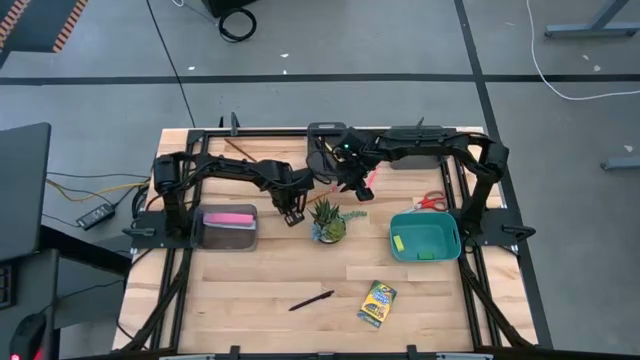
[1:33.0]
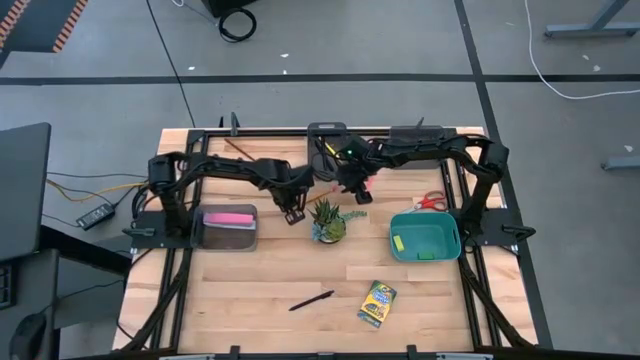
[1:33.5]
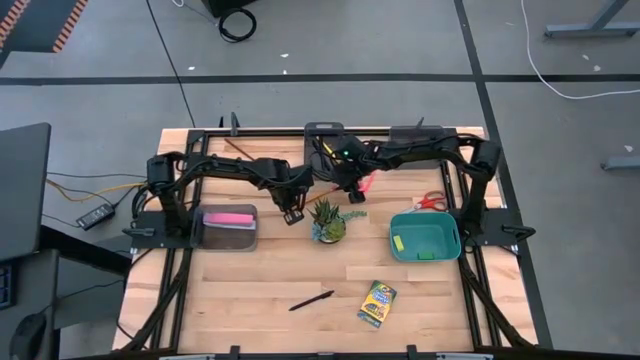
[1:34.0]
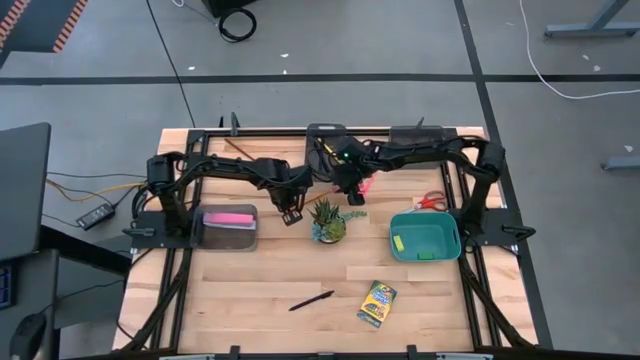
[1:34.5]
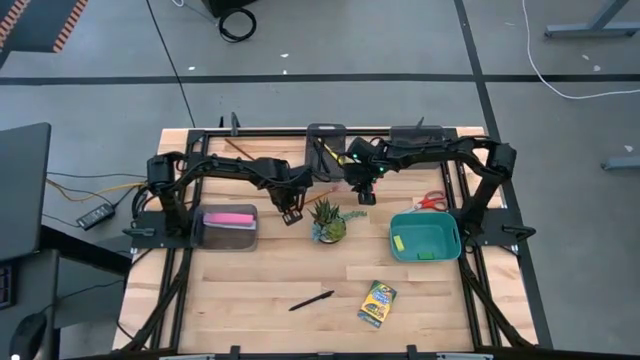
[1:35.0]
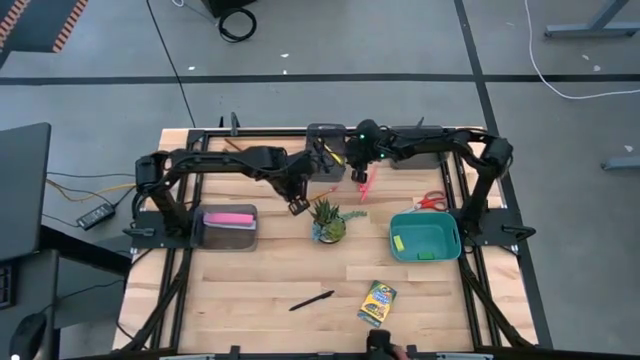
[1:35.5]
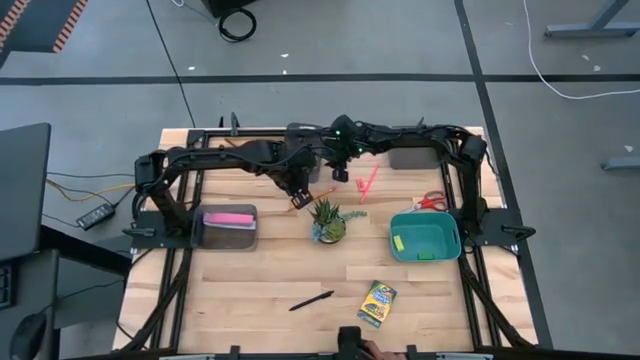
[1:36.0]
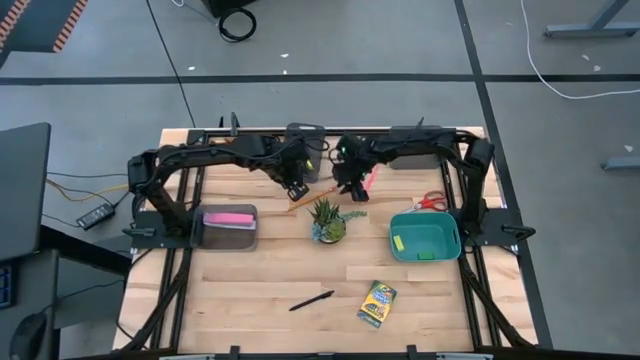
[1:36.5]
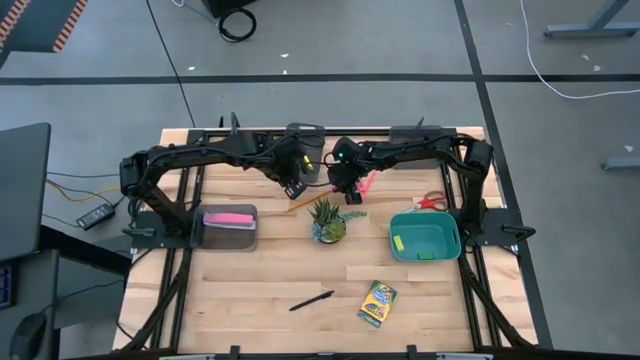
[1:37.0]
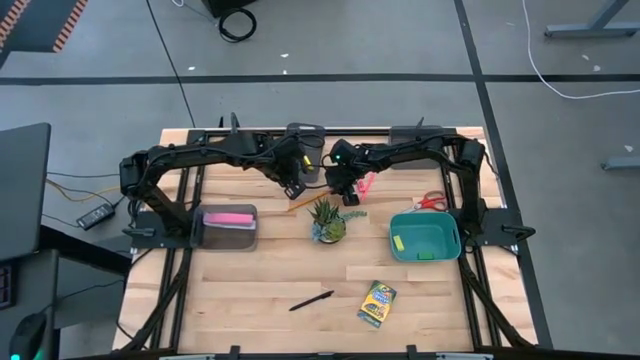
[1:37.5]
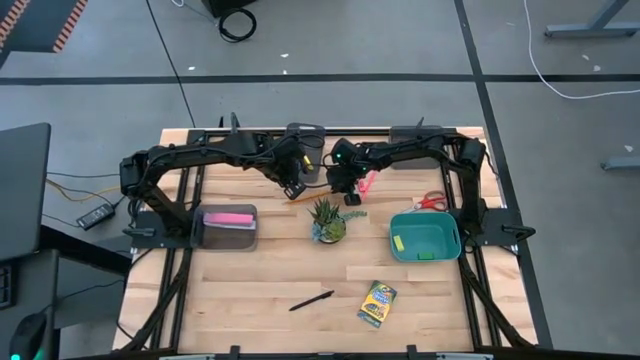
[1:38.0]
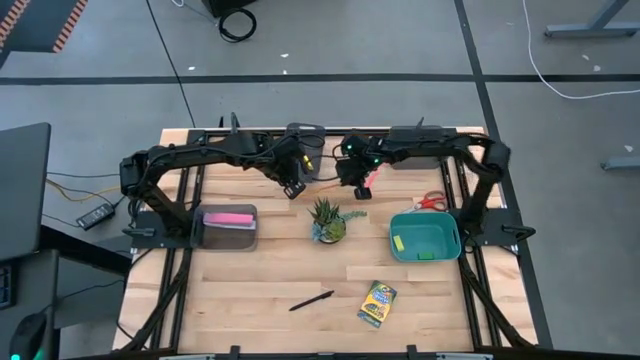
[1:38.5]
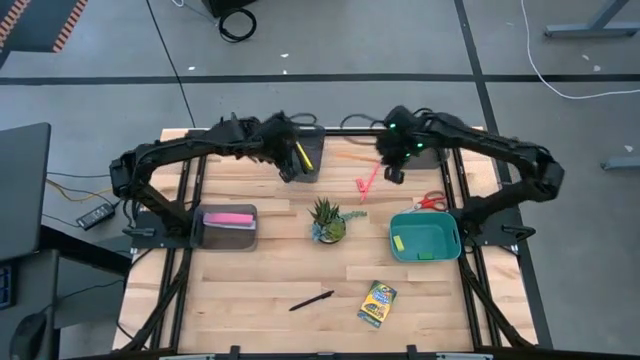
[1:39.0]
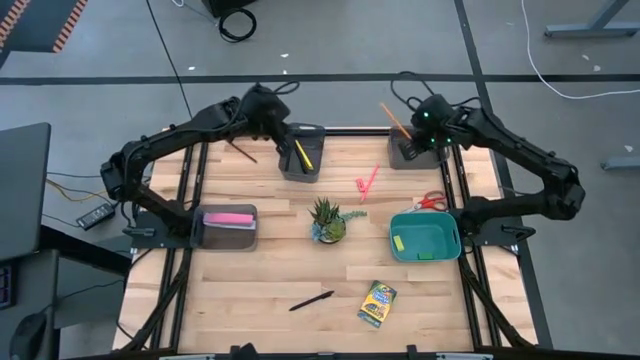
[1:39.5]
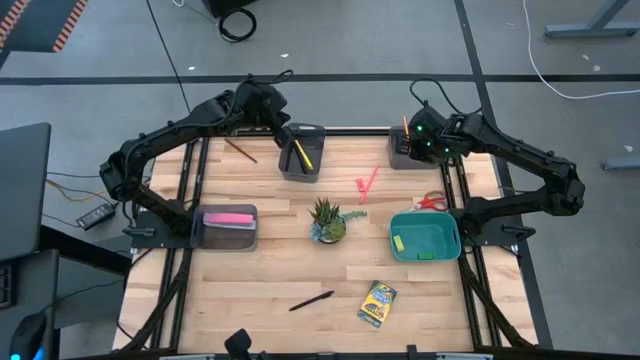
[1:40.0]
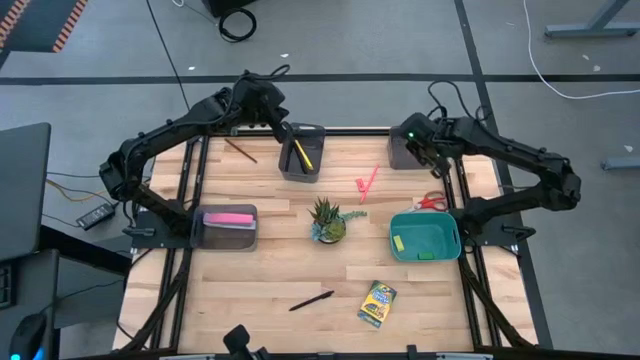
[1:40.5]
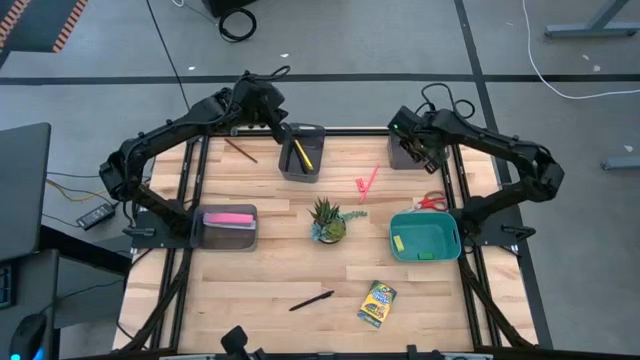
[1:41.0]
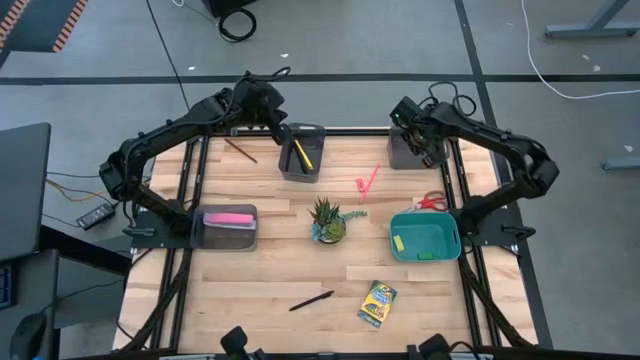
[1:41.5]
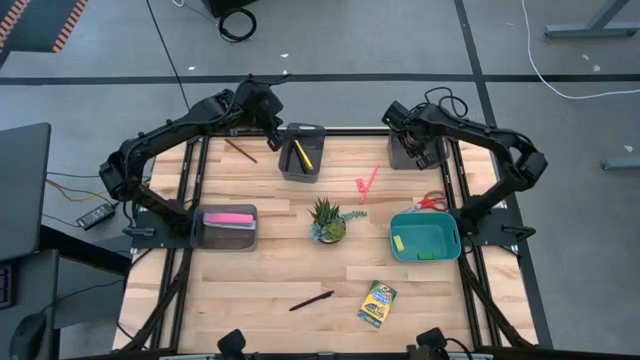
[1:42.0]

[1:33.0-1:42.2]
Task: Sort crayons/erasers/pens/pencils in bins
Put the orange pencil into the right black bin

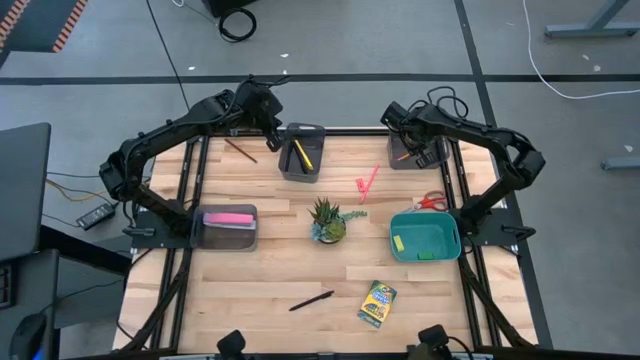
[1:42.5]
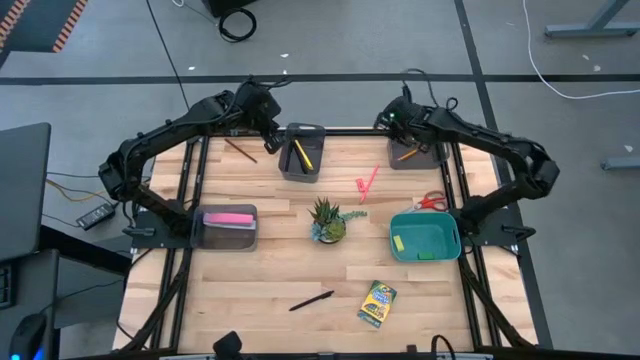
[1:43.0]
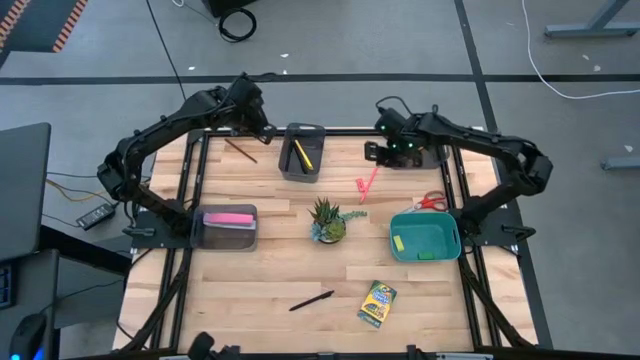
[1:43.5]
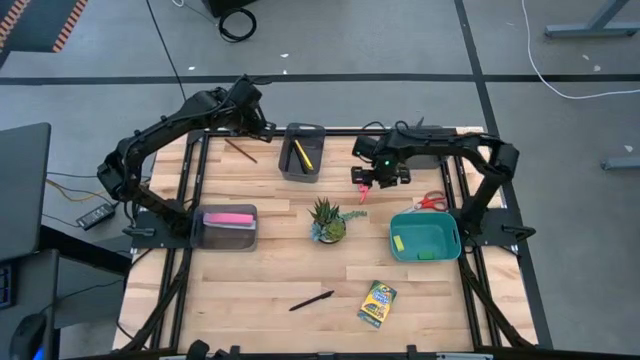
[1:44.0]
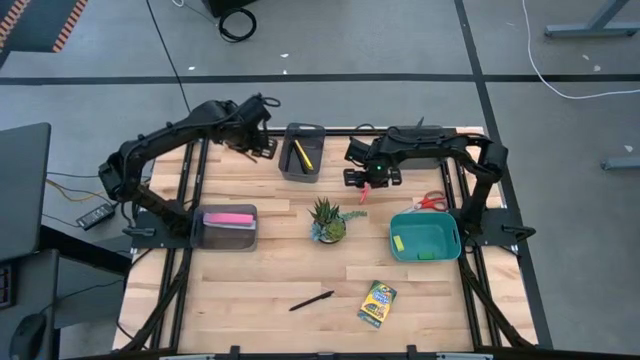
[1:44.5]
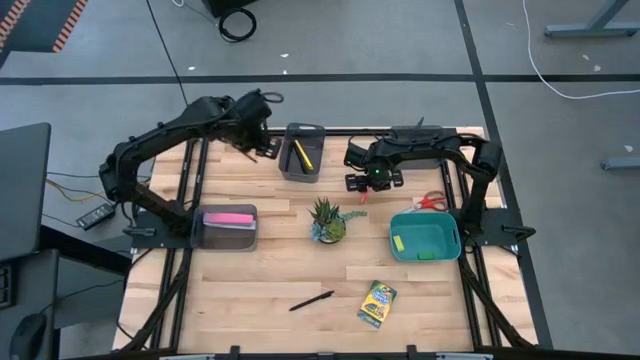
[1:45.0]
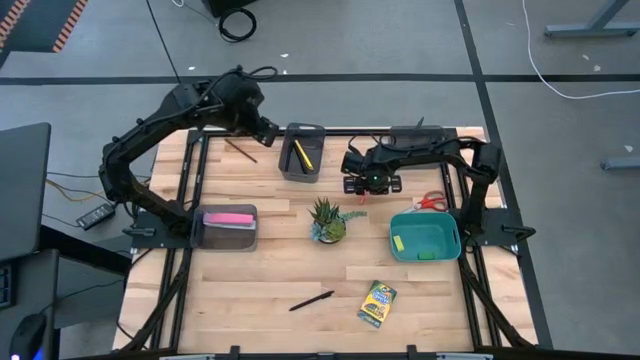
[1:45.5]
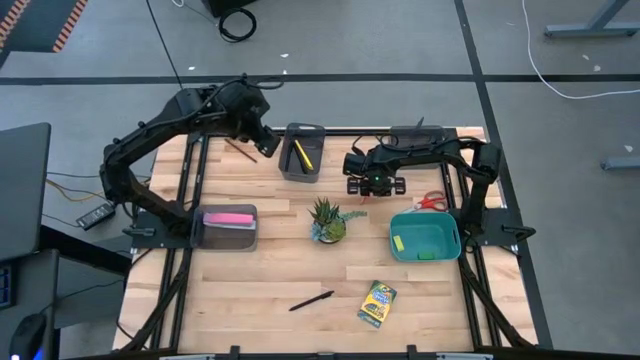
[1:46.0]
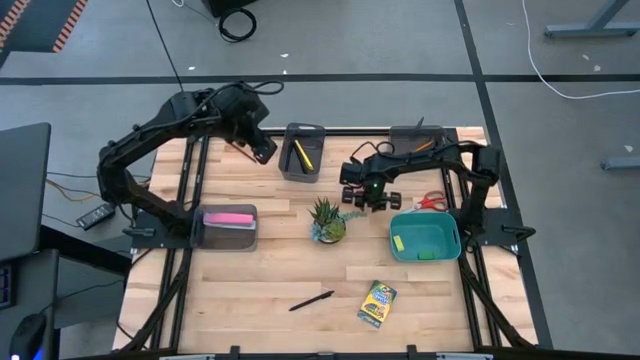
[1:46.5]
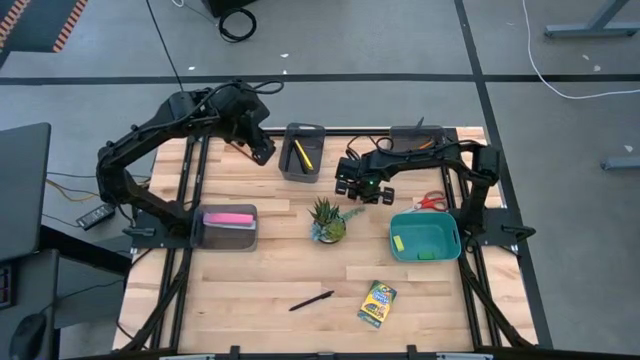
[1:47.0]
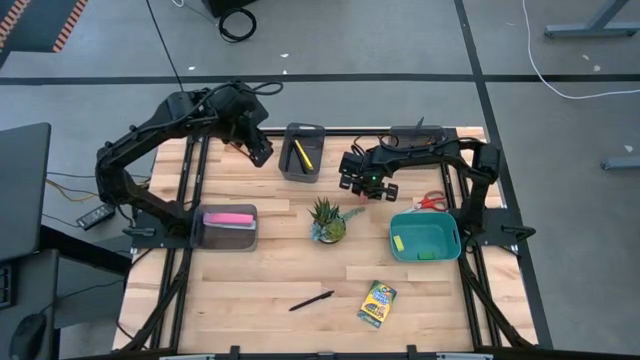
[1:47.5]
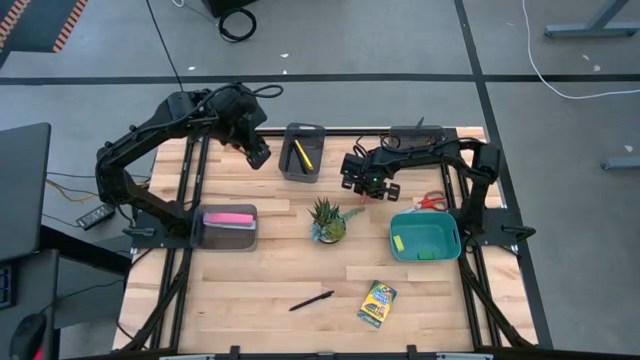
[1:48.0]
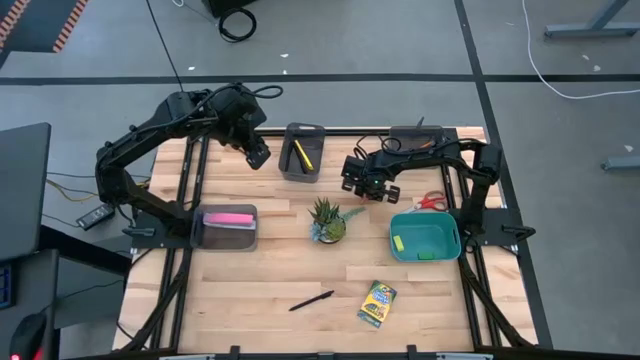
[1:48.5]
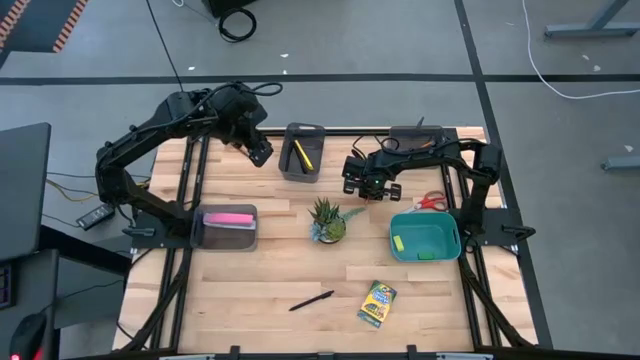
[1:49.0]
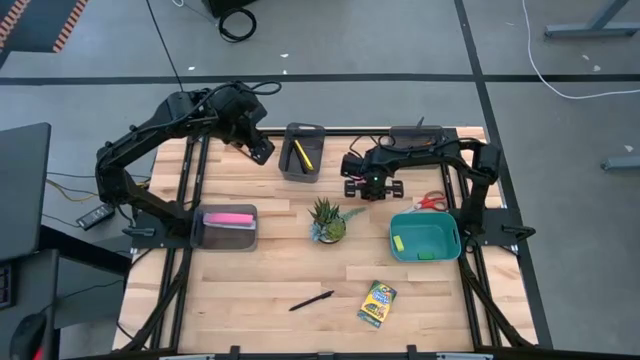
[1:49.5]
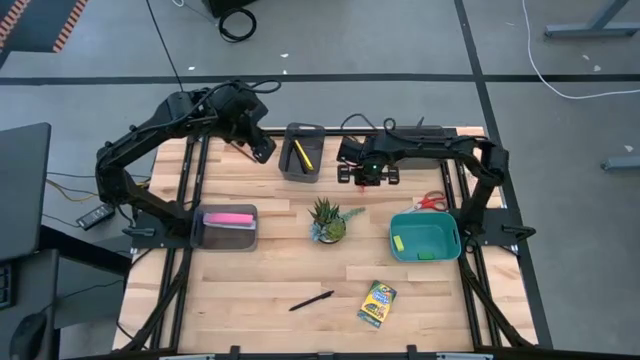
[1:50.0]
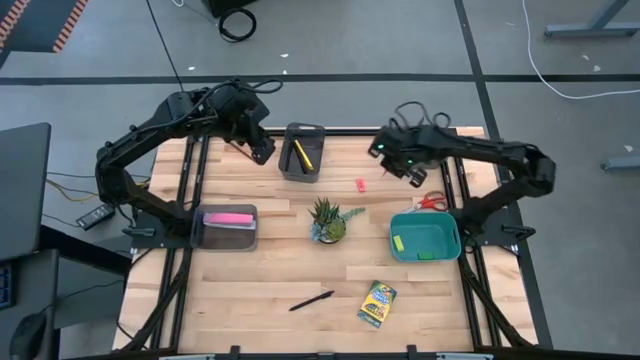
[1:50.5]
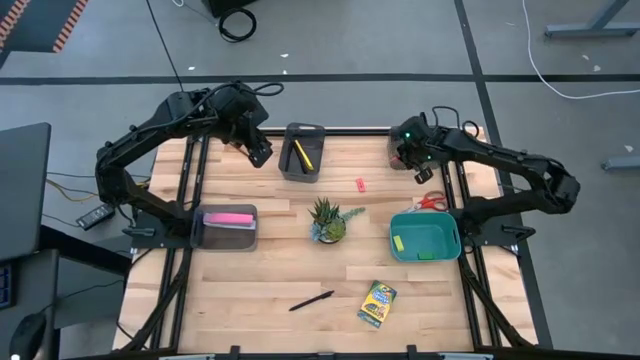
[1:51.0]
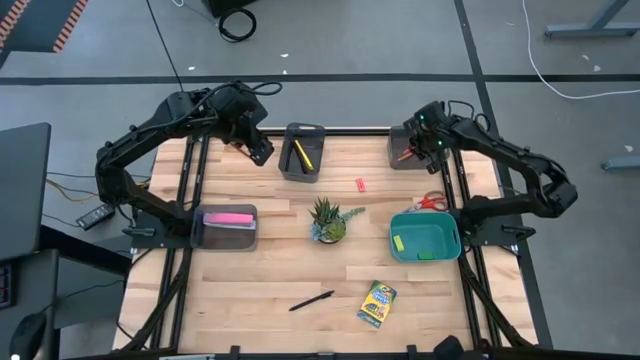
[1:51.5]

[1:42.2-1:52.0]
Put the pink pencil into the right black bin

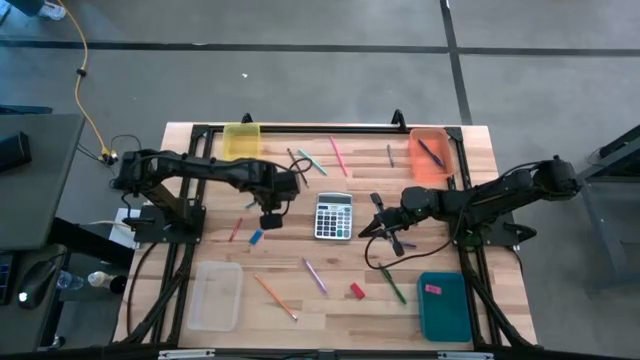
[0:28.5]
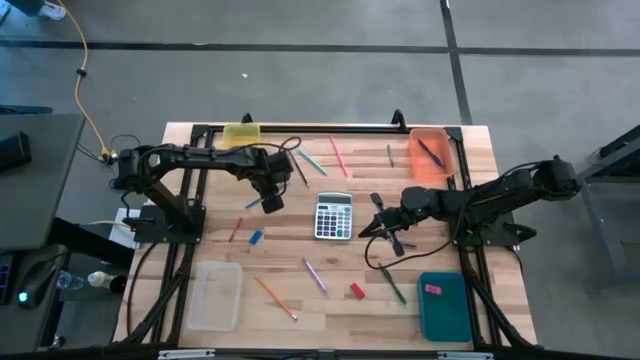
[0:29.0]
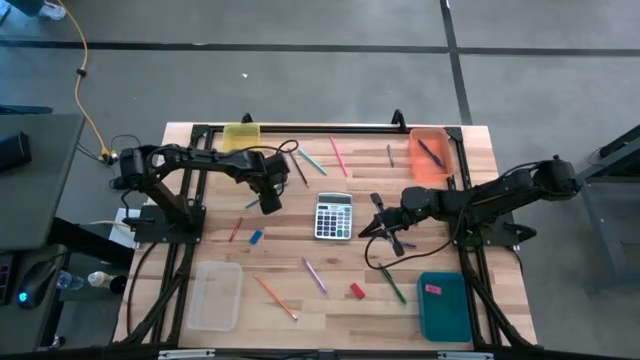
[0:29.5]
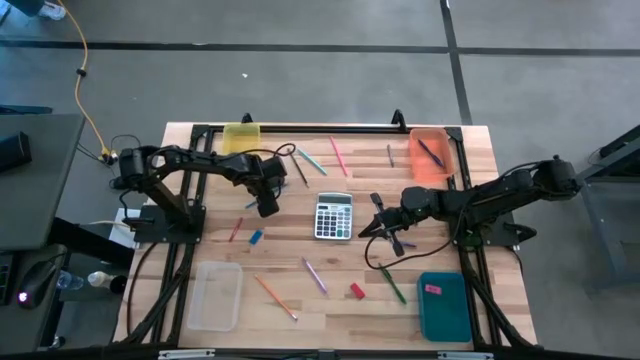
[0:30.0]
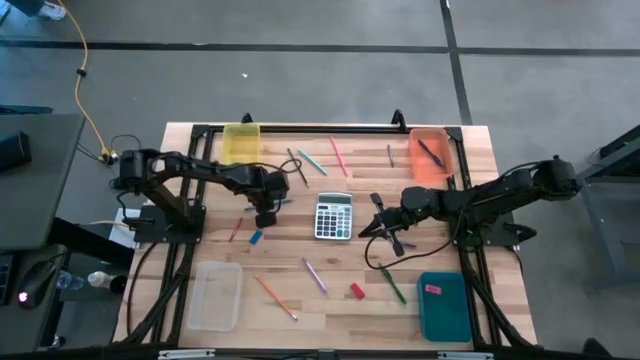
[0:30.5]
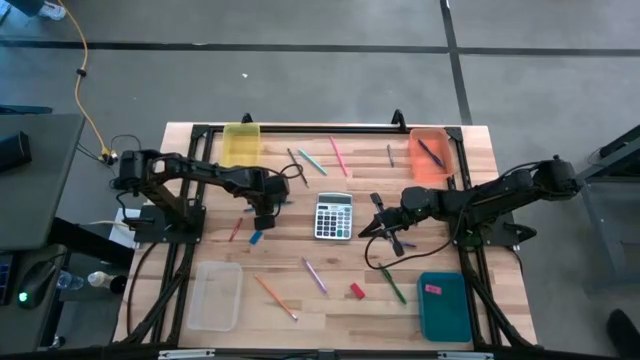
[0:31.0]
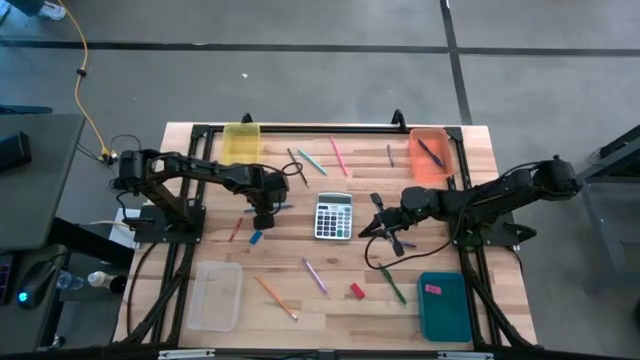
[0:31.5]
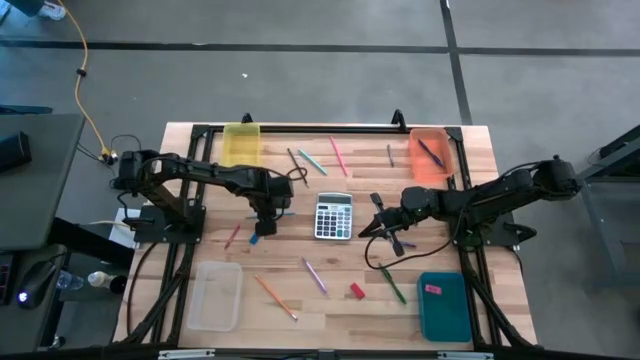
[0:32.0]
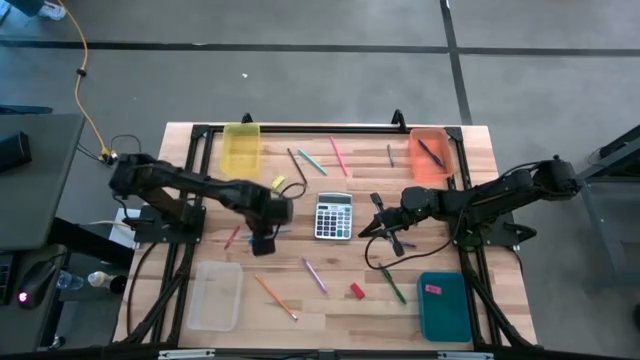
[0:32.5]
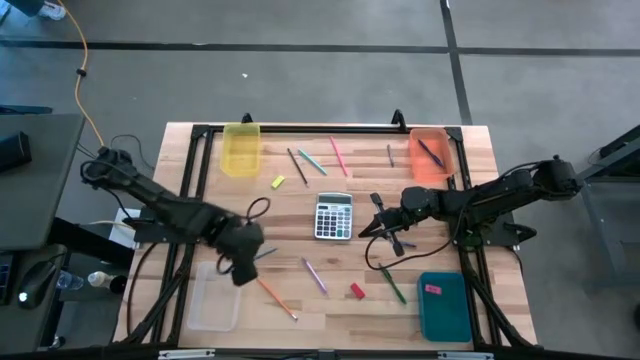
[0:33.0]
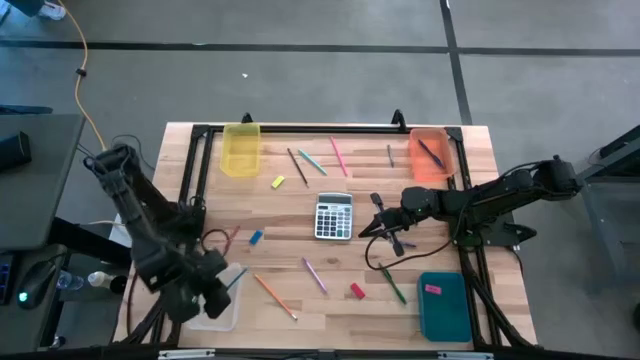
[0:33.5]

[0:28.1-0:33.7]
Task: Sort crayons/erasers/pens/pencils in bins
Put the blue colored pencil into the transparent bin
